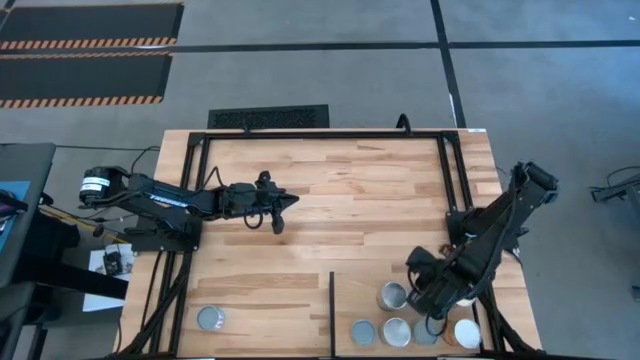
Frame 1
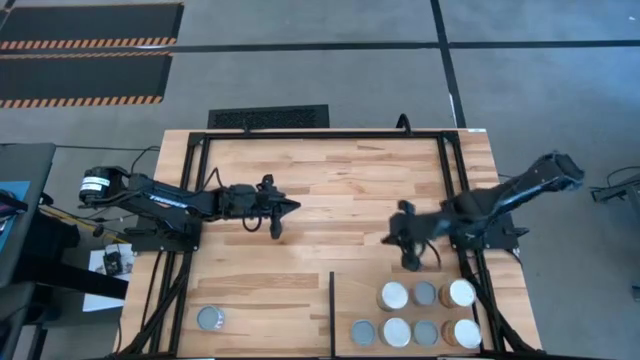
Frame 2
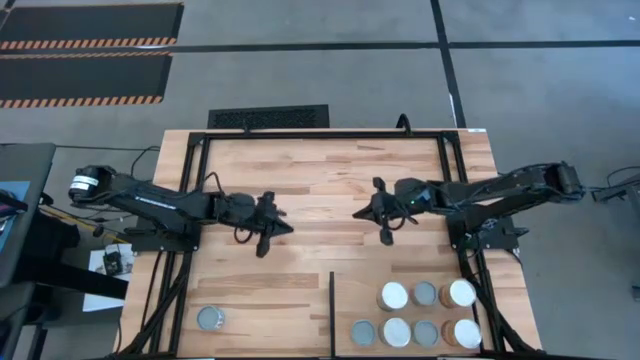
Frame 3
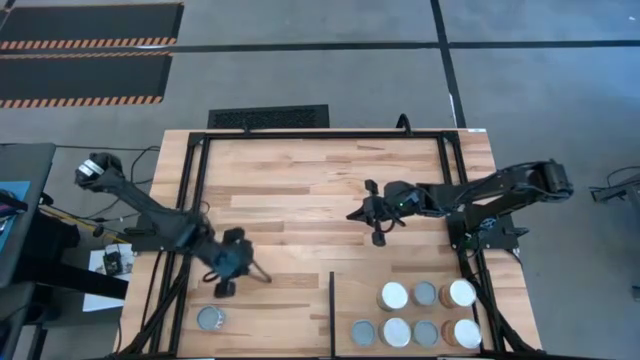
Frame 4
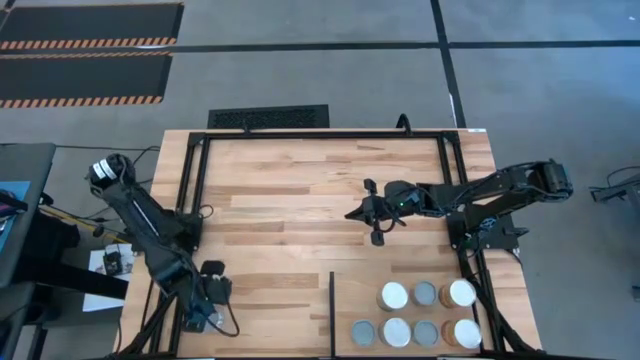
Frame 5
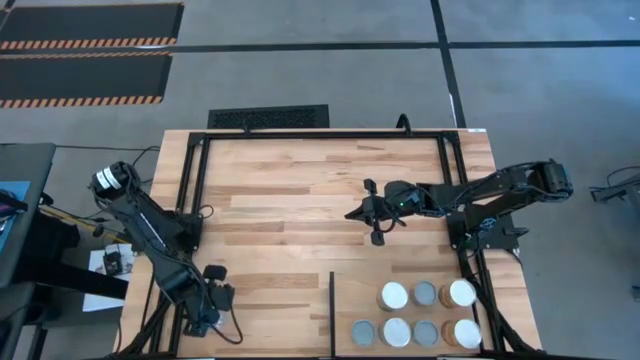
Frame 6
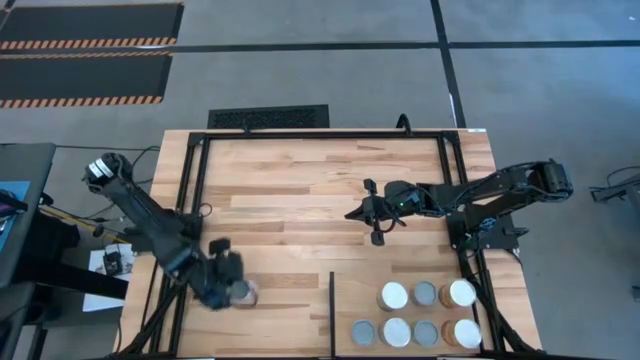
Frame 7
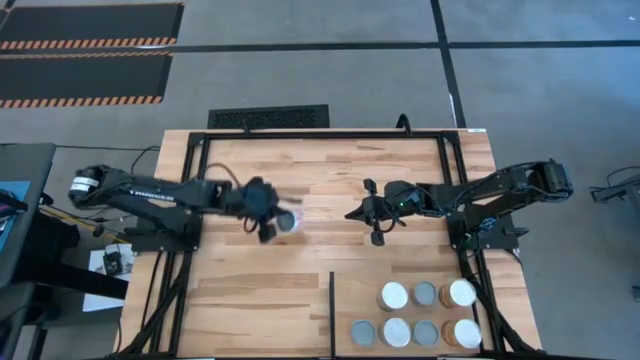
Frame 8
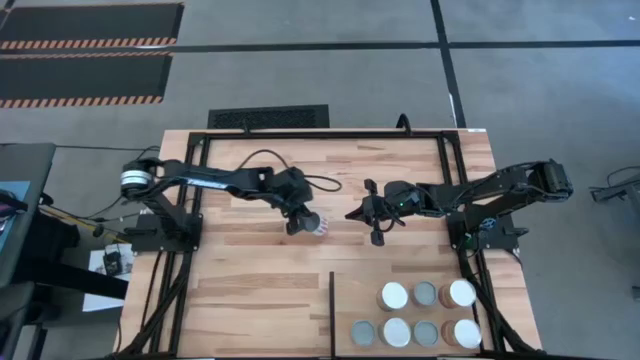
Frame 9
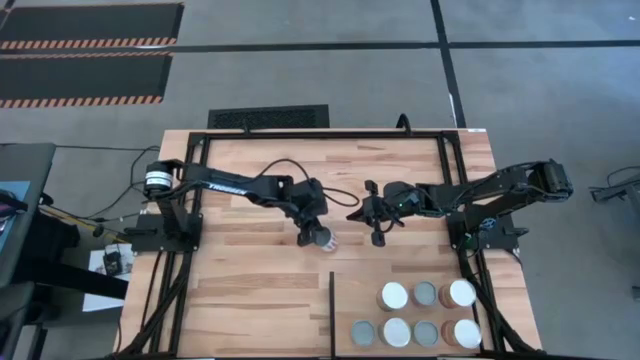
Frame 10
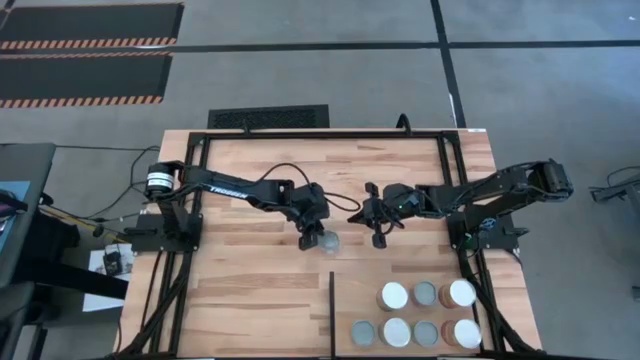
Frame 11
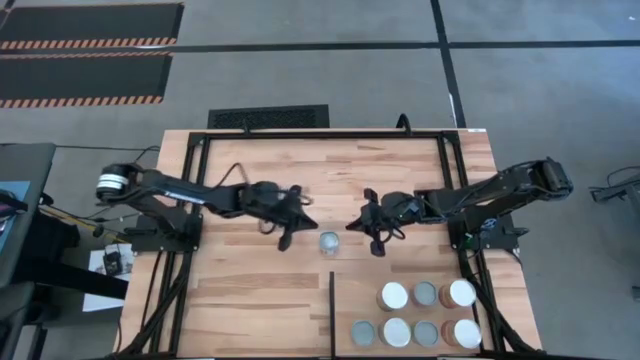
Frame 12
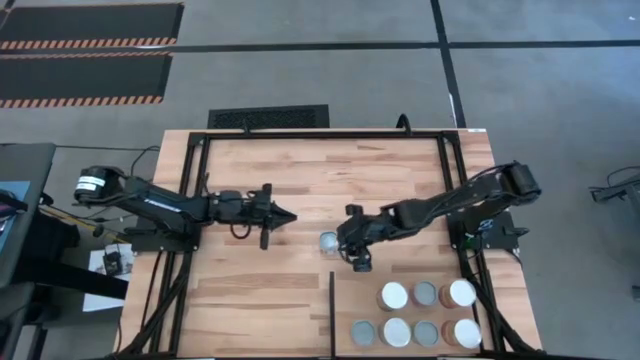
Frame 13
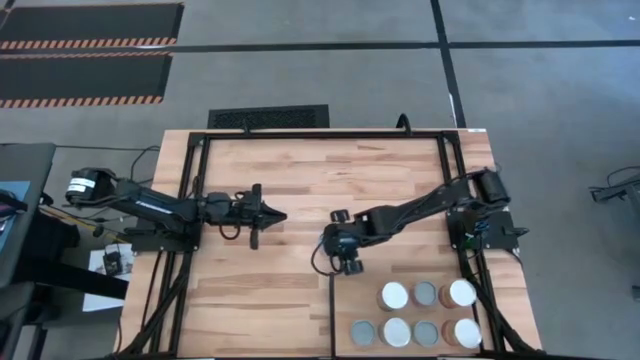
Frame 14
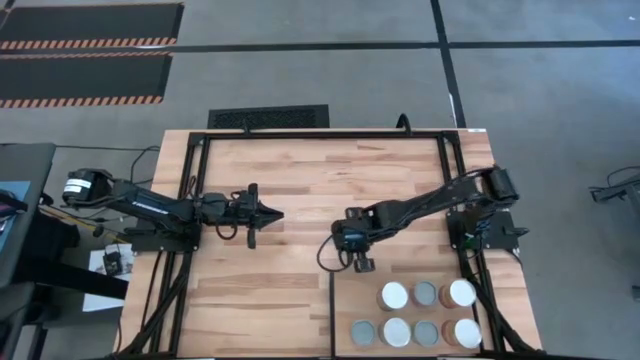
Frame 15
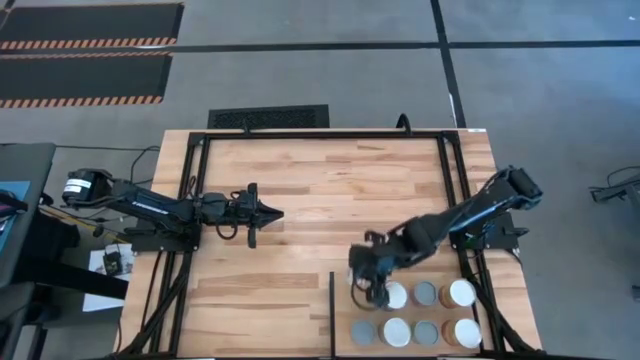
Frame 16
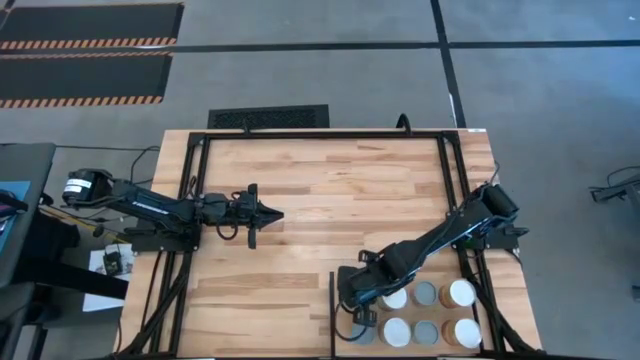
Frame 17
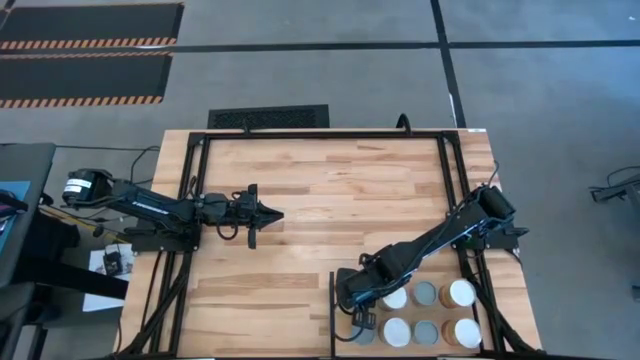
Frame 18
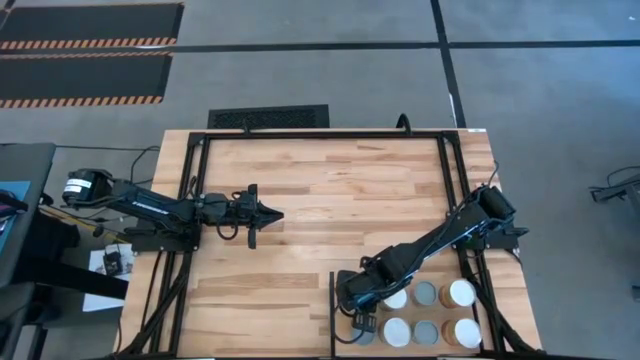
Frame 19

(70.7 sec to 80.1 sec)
Task: Pick and place cans onto a shelf
Put the canned carrots on the shelf

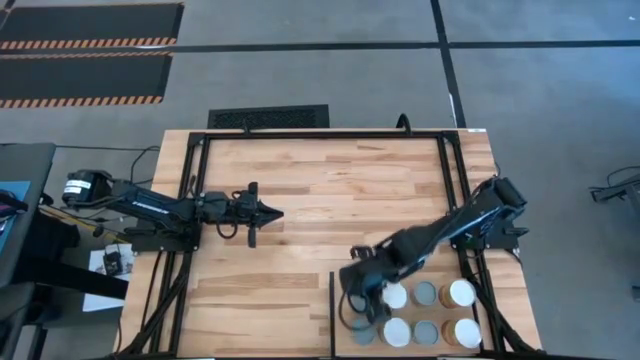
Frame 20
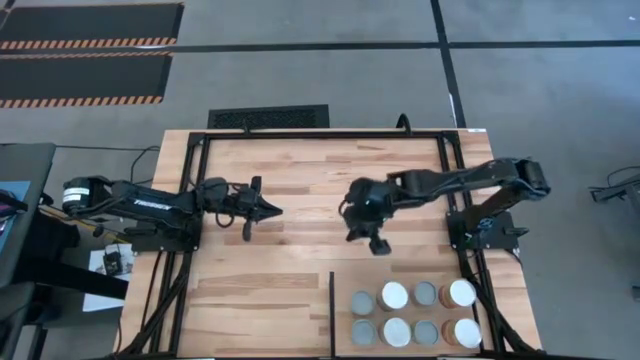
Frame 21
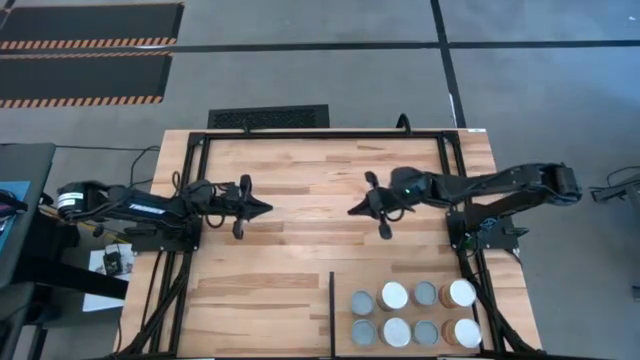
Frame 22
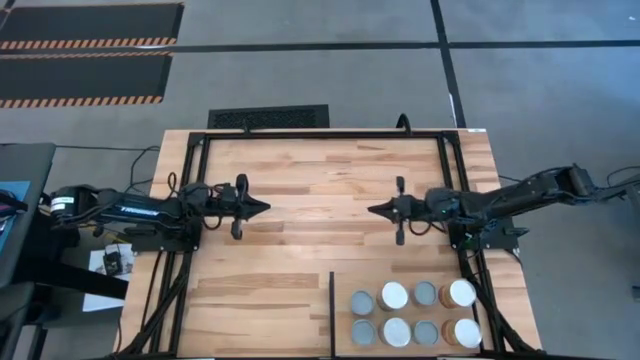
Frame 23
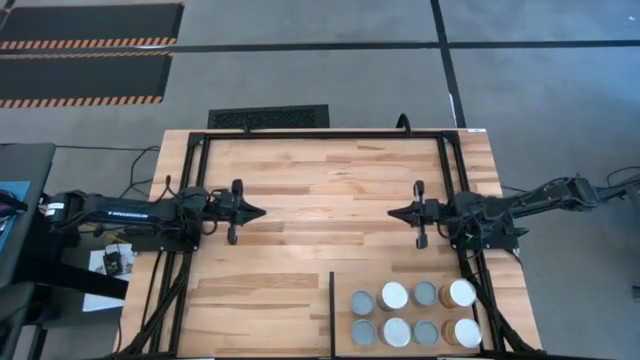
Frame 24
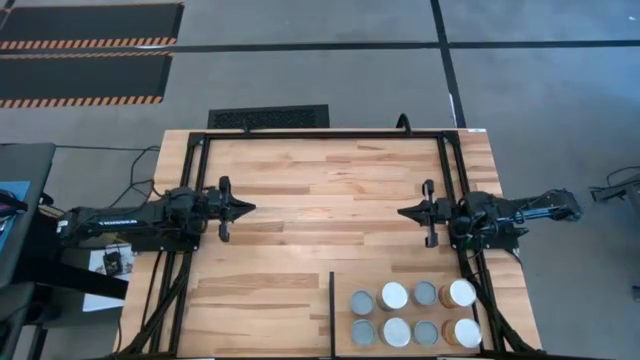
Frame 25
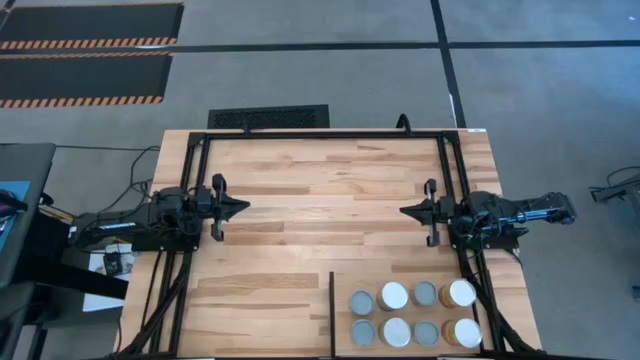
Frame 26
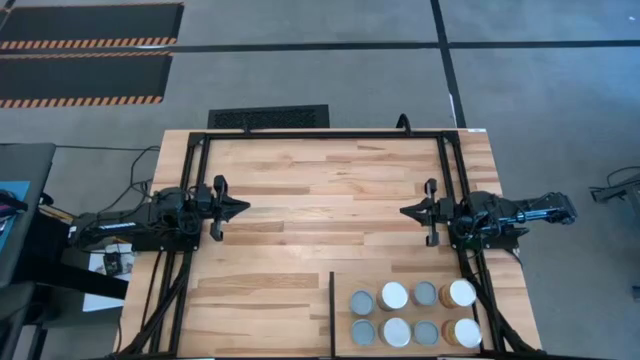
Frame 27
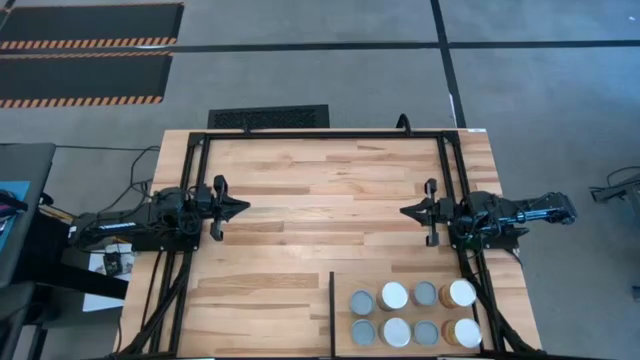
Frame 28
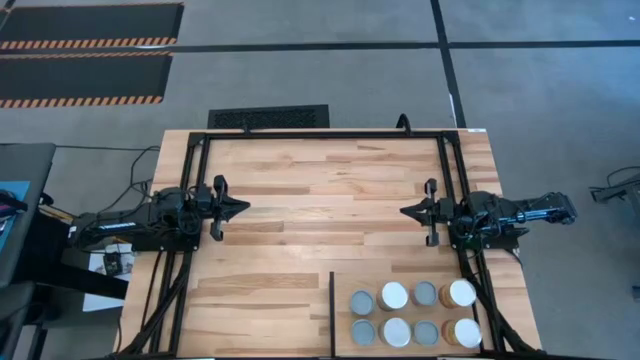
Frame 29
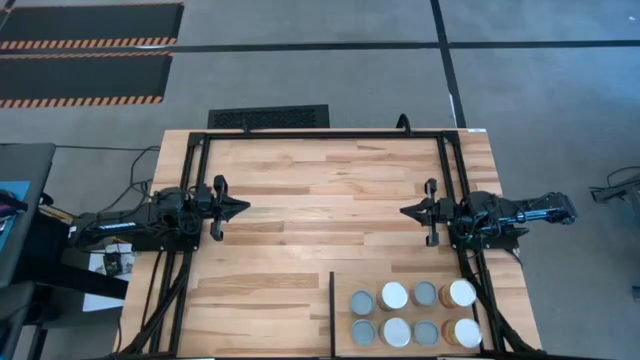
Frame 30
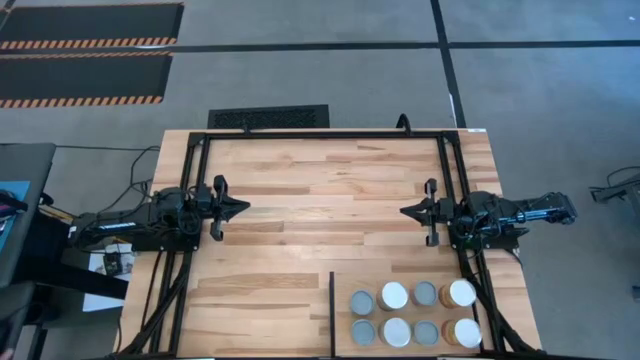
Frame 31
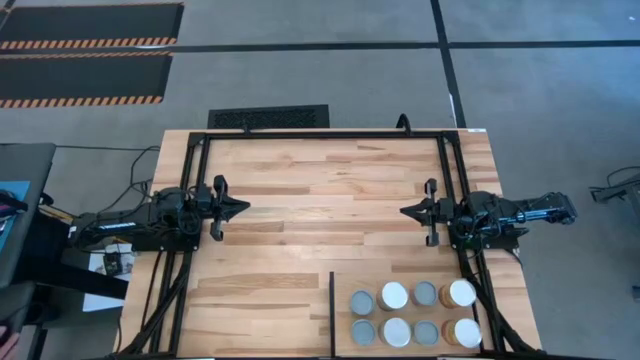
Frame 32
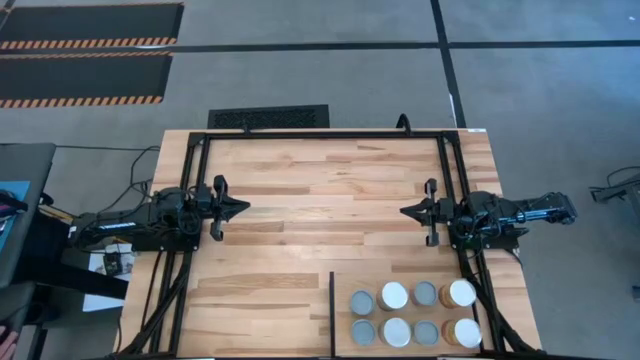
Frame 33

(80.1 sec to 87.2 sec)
Return to Home Position

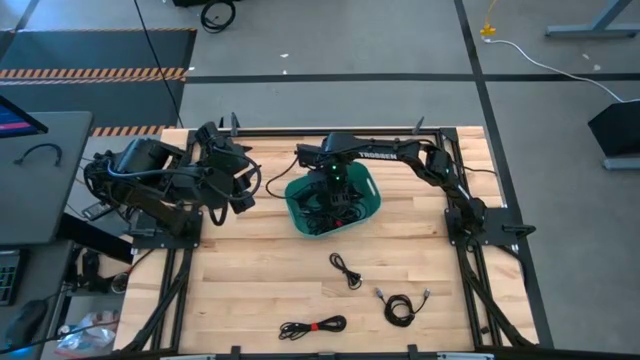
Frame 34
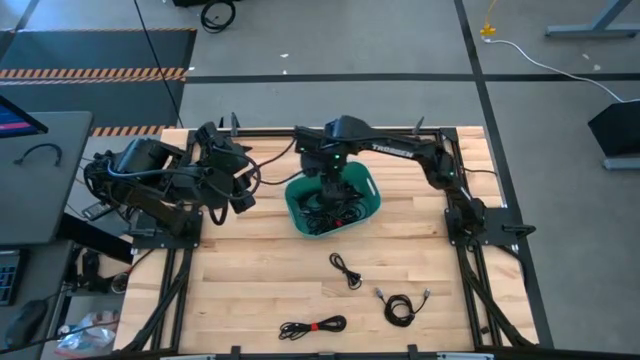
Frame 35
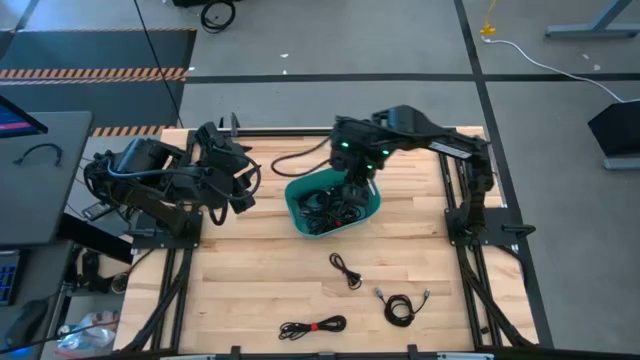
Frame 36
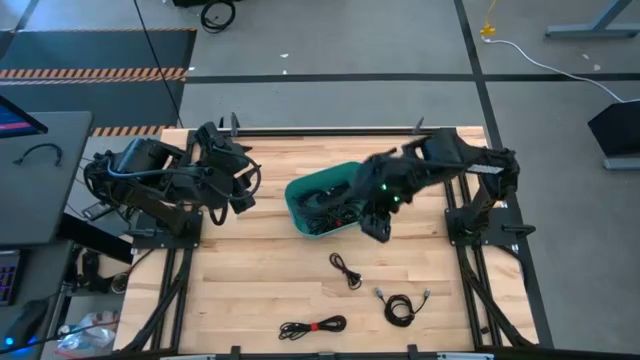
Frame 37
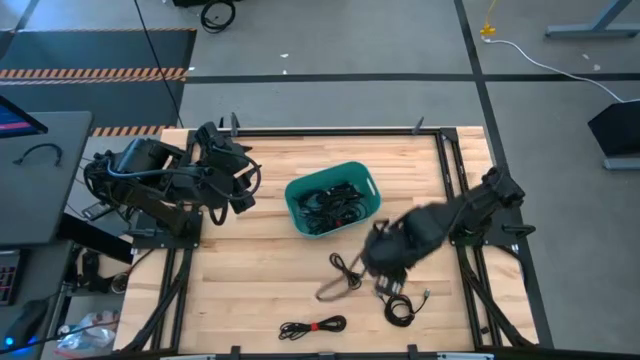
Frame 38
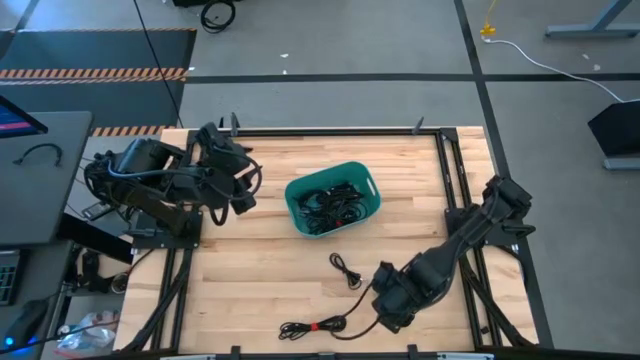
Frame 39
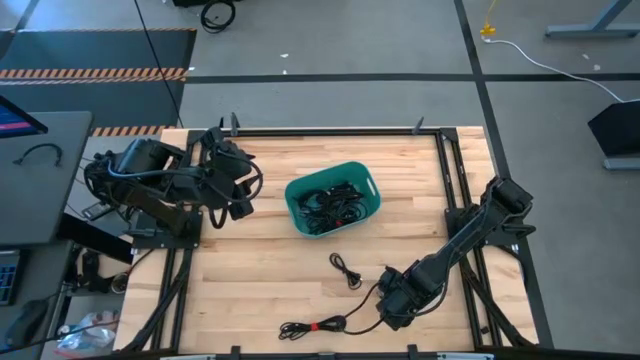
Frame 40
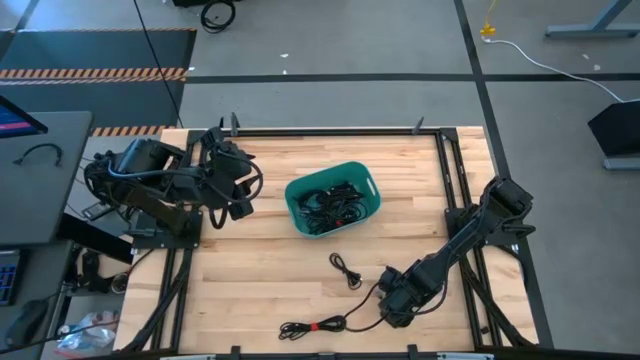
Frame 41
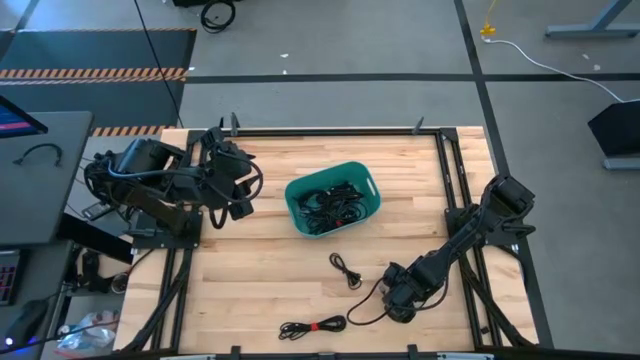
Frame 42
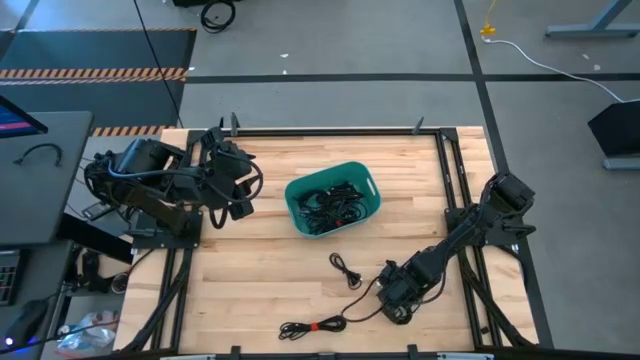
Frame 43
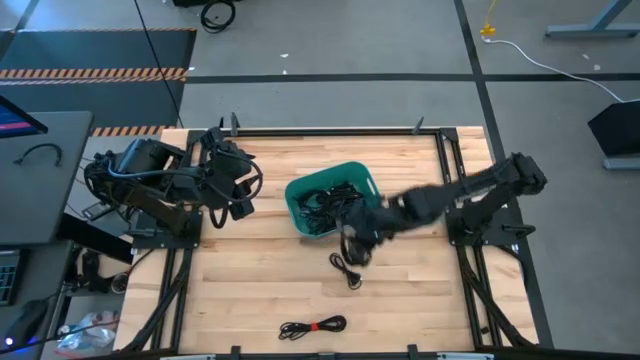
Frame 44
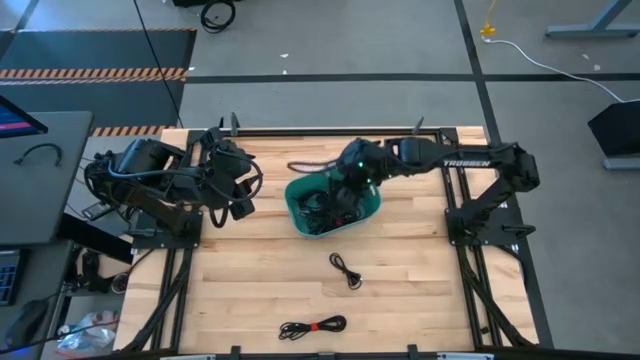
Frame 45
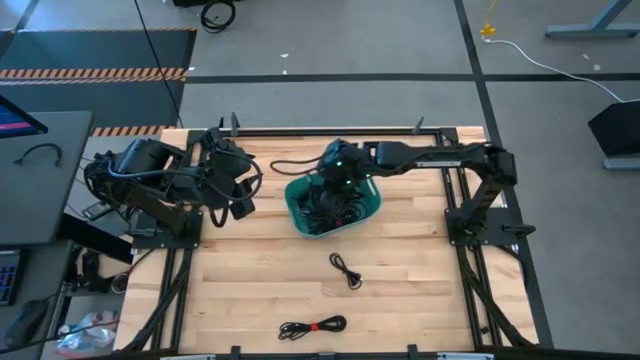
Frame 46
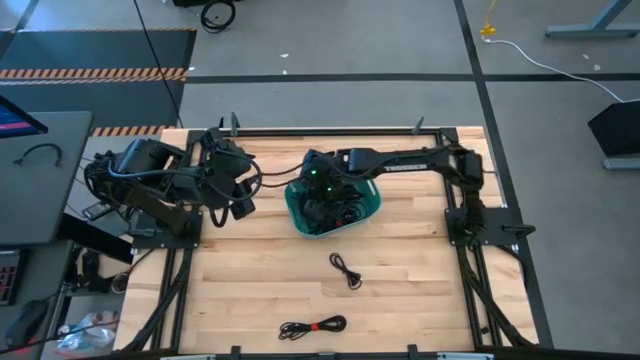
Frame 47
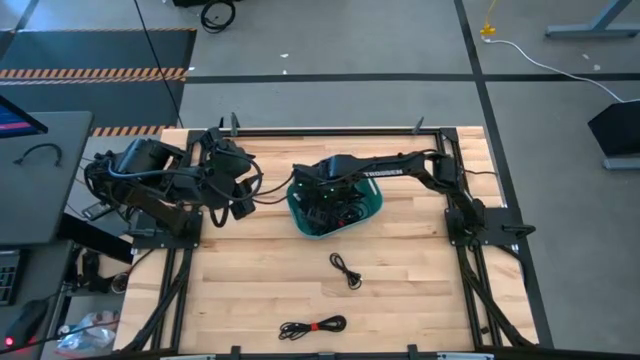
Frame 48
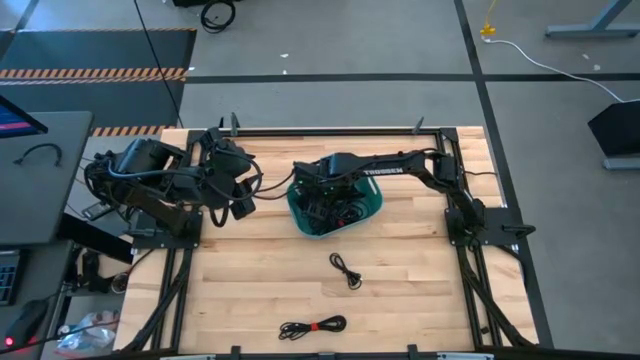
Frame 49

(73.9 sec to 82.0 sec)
Task: Pick and place USB-C Cables
Put the black charger cable into the green bin
